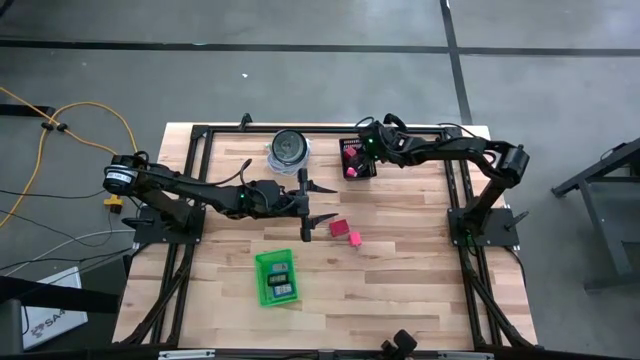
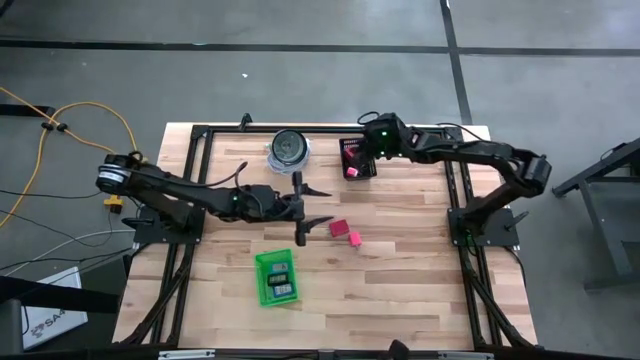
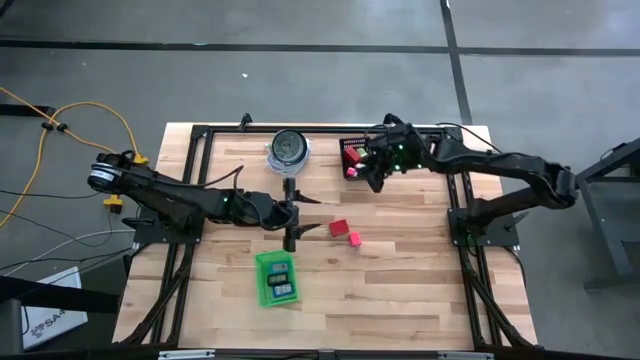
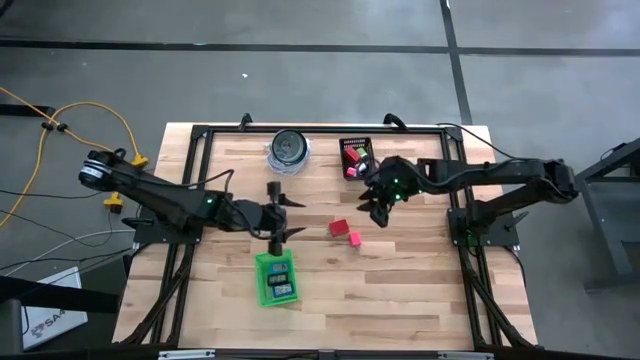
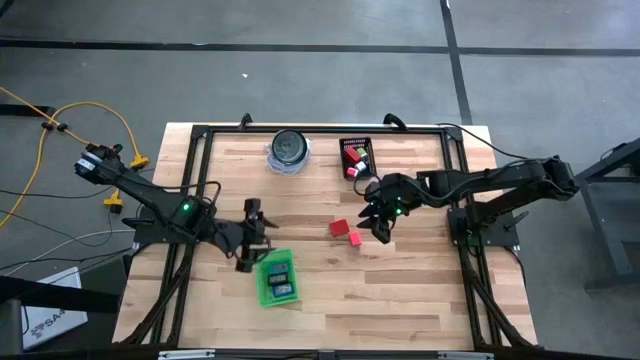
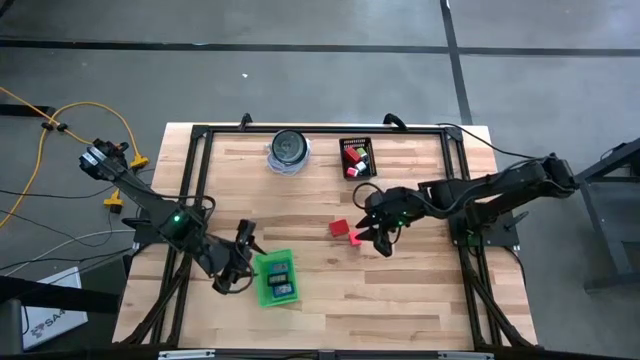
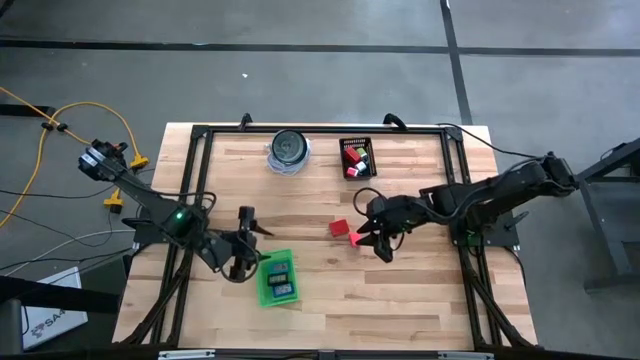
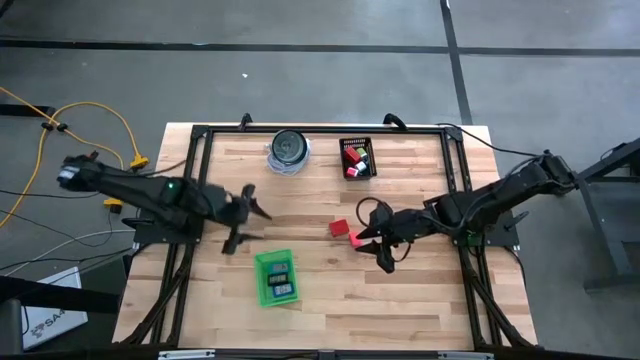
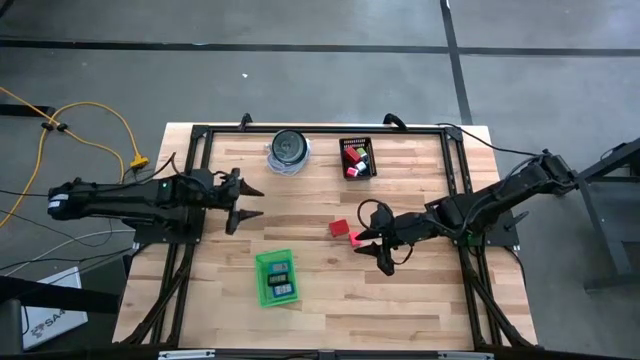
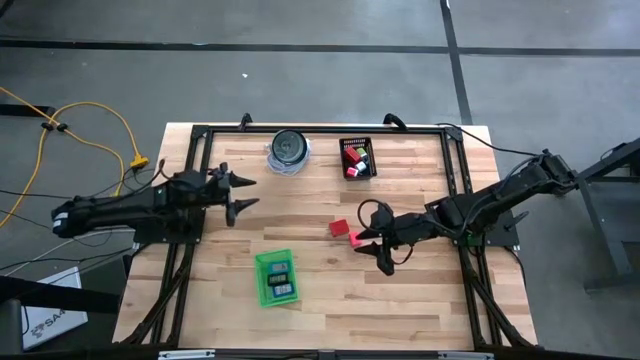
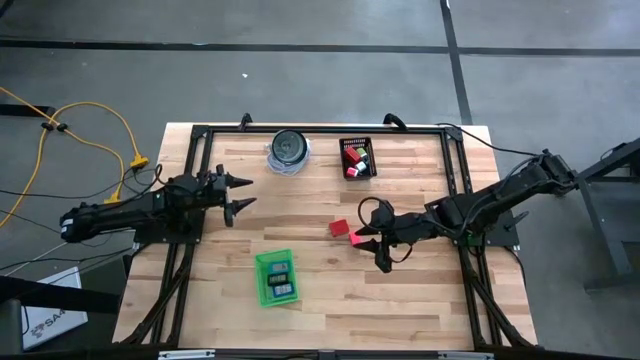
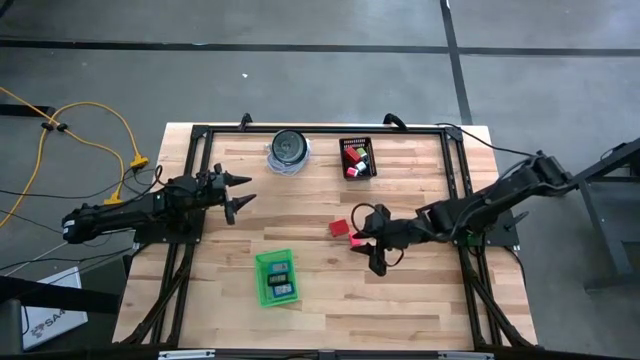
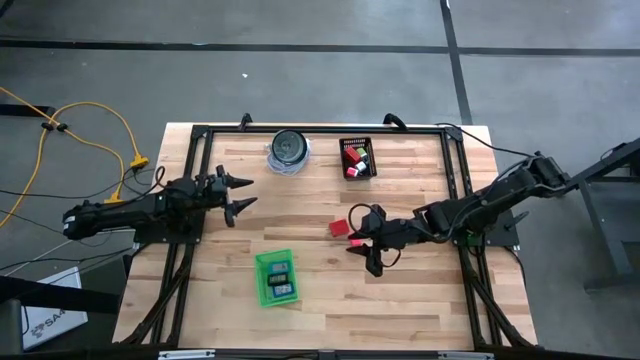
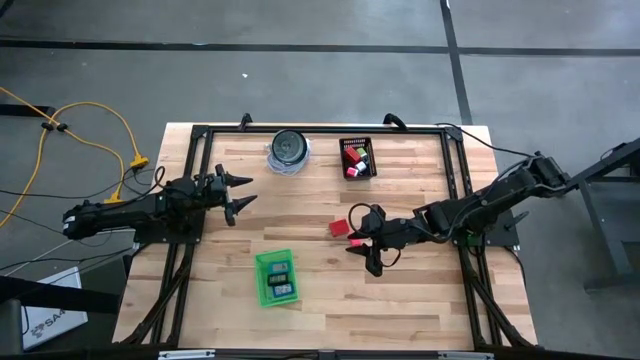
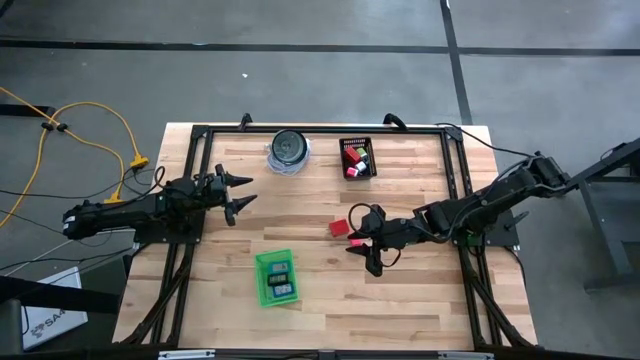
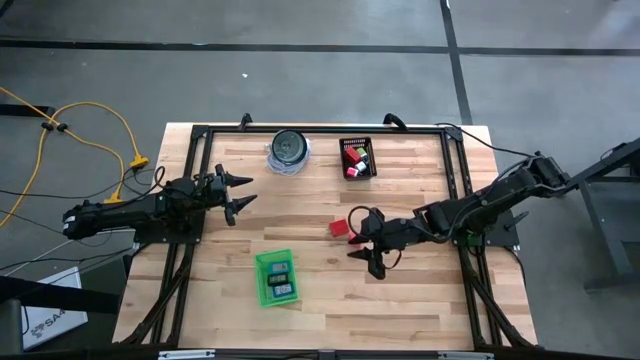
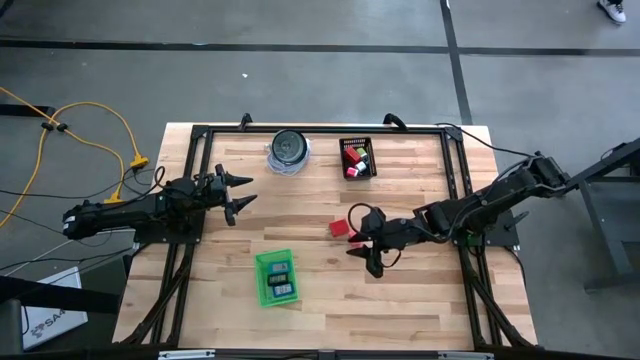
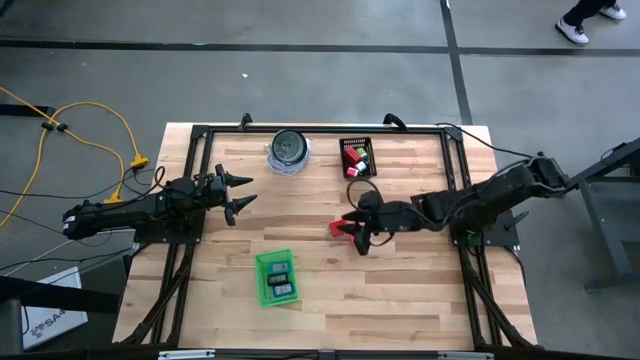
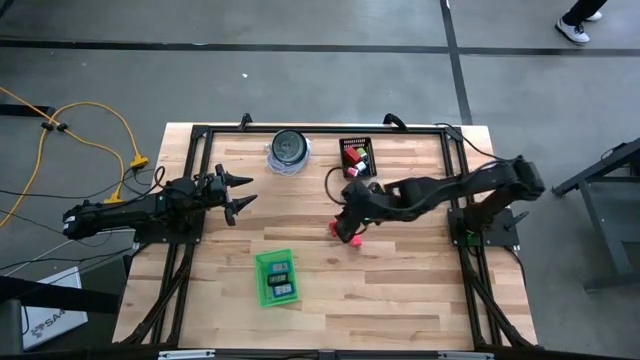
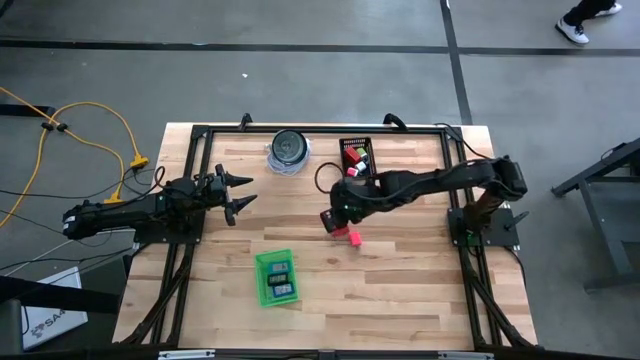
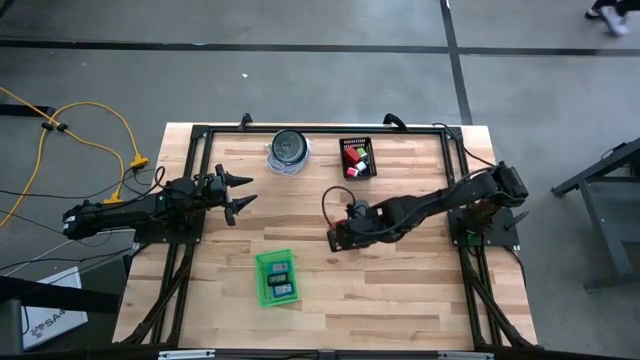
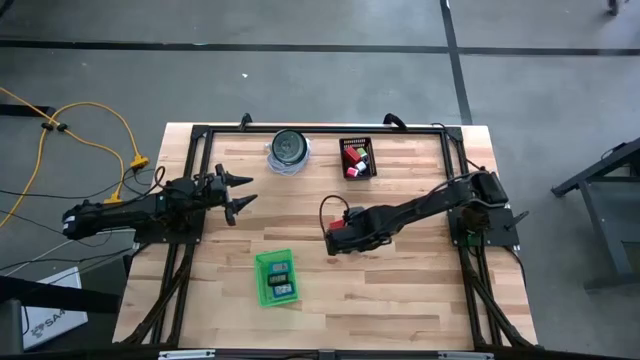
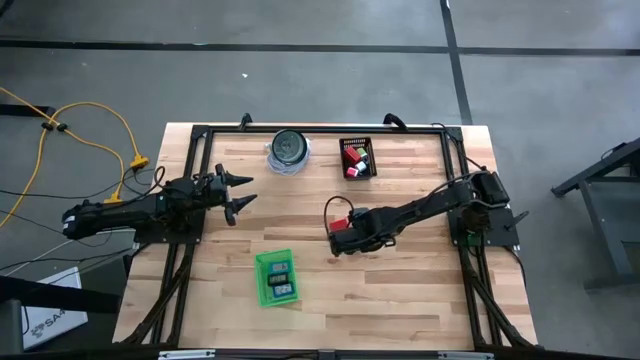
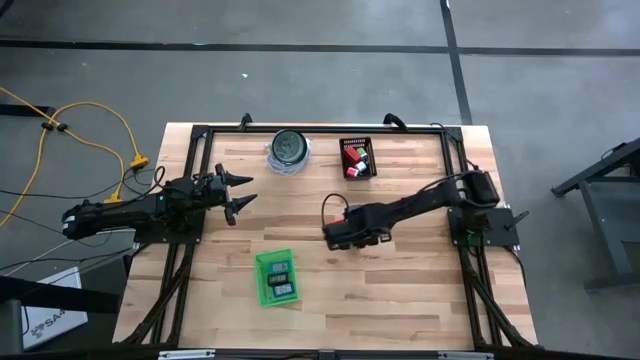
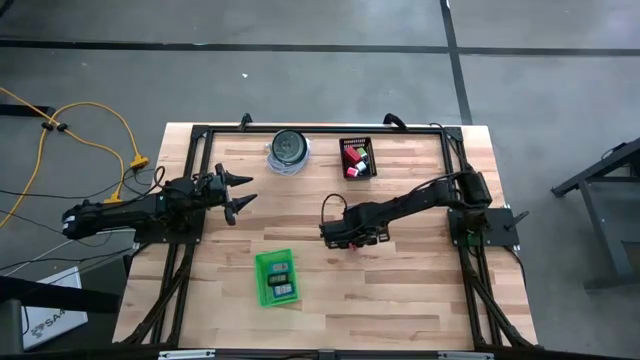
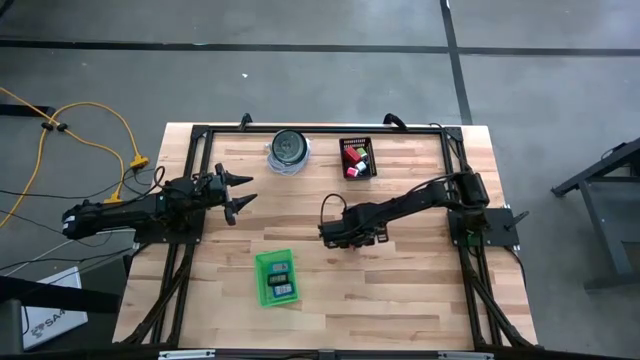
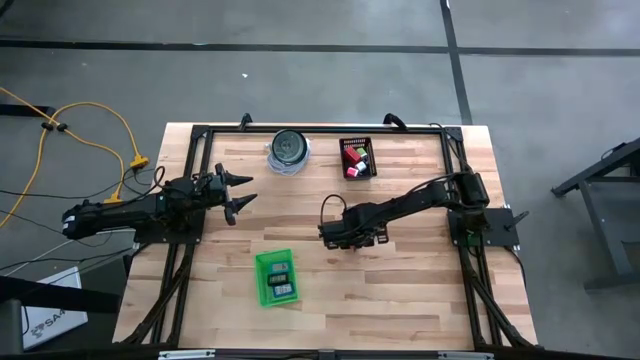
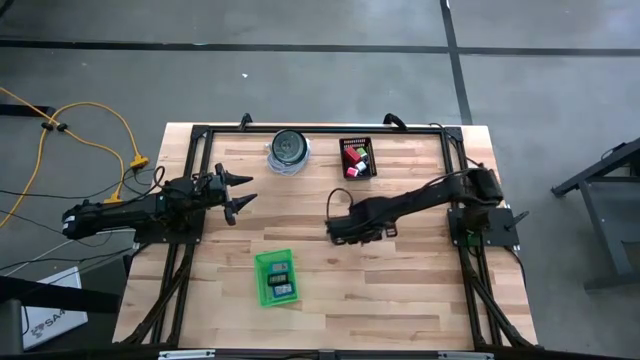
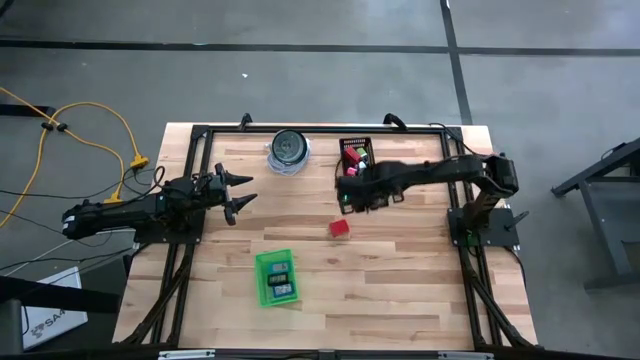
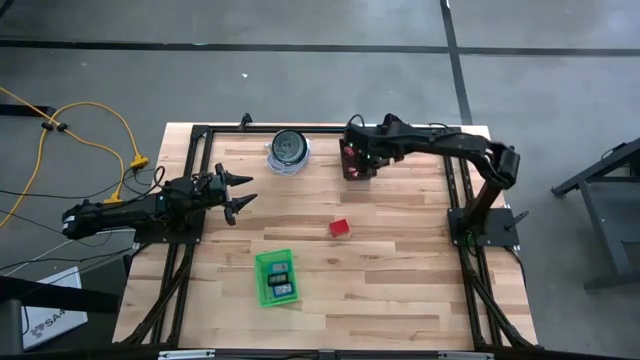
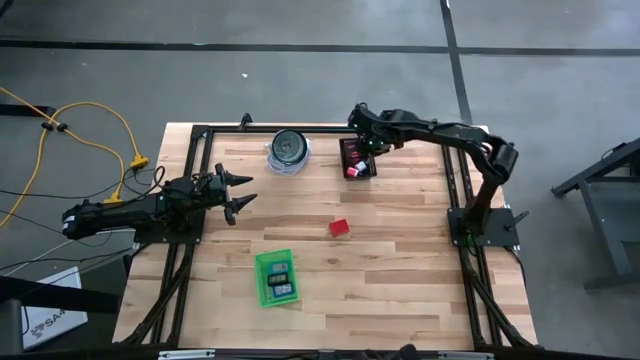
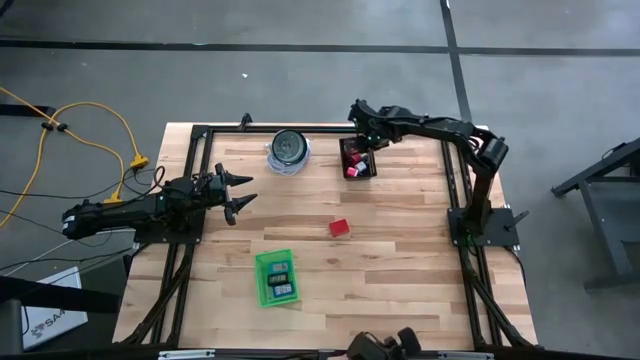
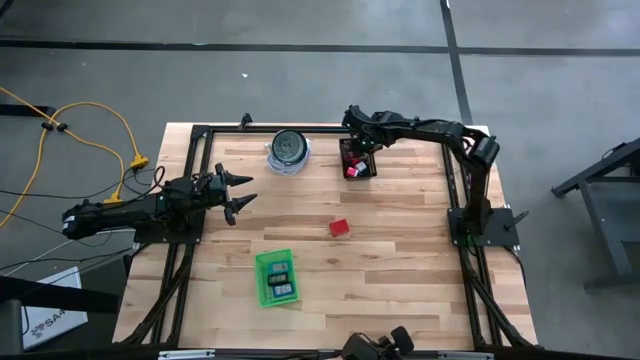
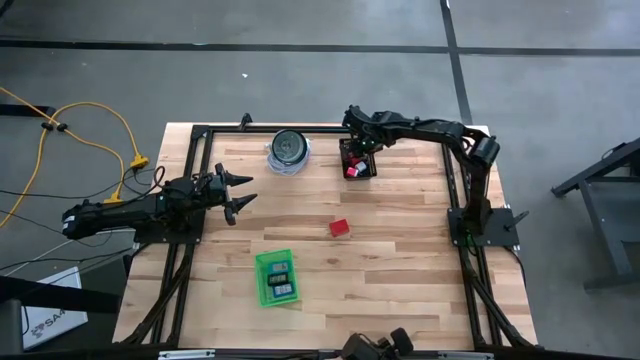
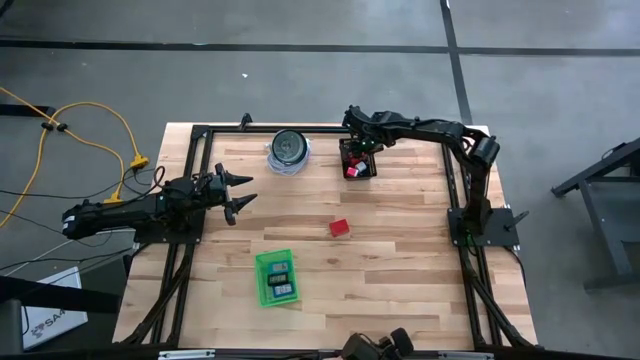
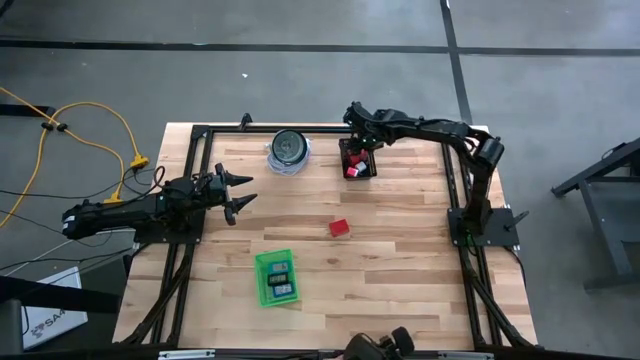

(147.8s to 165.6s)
Task: Pick & Place Office items
Put the light pink charger adapter into the black bin
